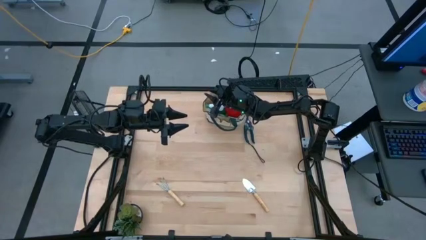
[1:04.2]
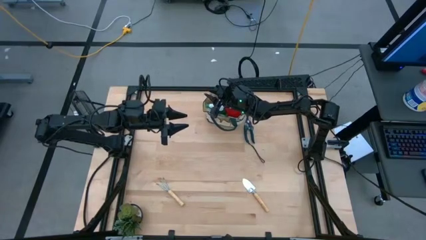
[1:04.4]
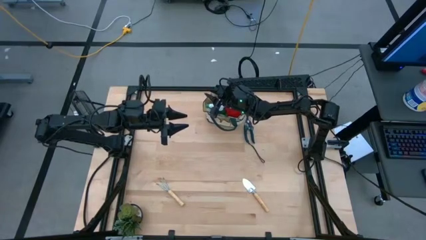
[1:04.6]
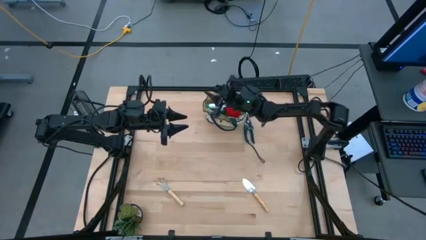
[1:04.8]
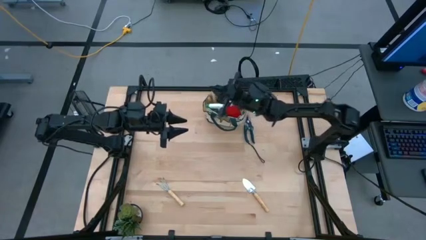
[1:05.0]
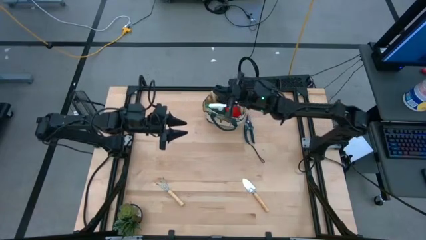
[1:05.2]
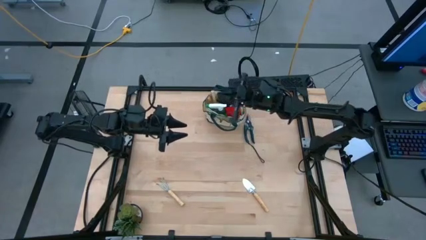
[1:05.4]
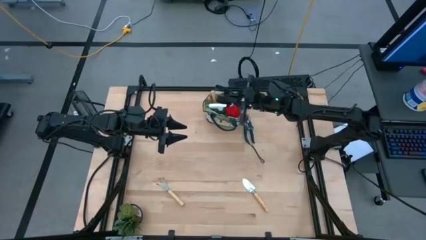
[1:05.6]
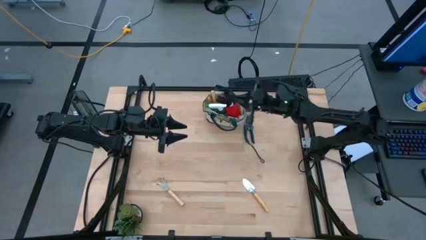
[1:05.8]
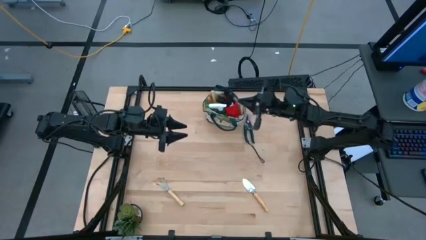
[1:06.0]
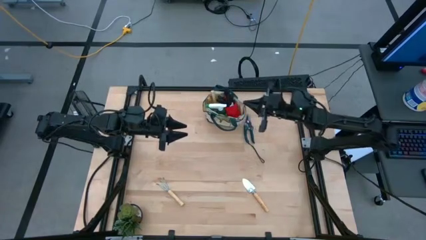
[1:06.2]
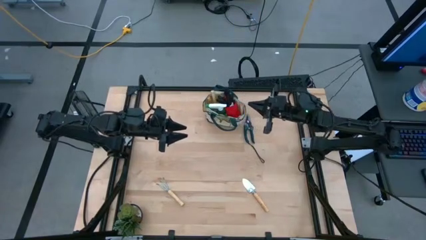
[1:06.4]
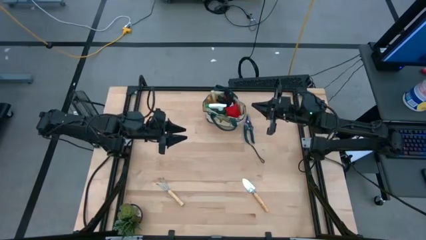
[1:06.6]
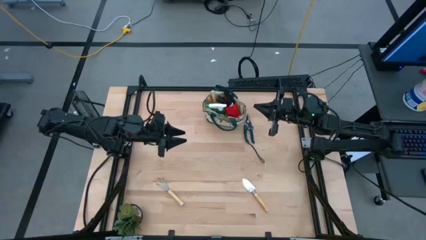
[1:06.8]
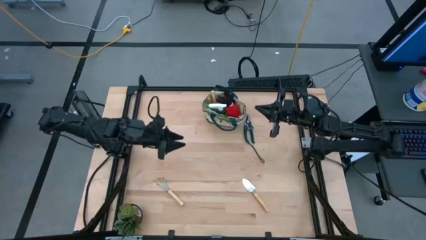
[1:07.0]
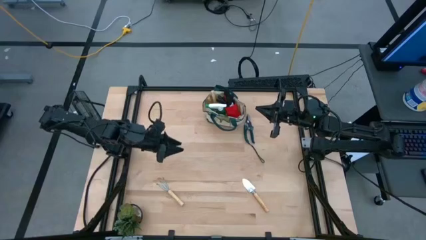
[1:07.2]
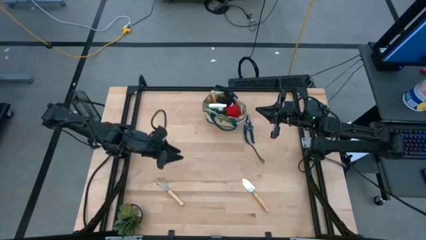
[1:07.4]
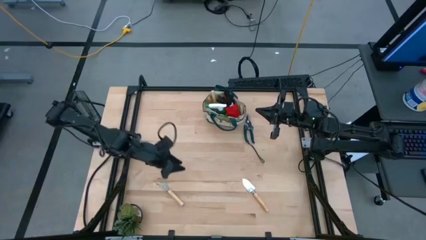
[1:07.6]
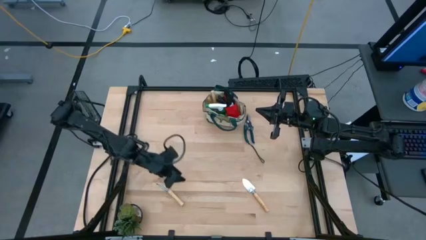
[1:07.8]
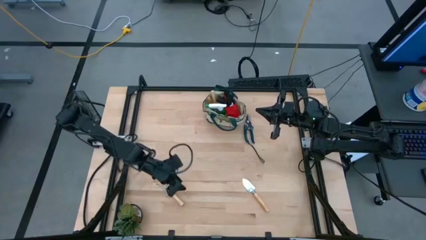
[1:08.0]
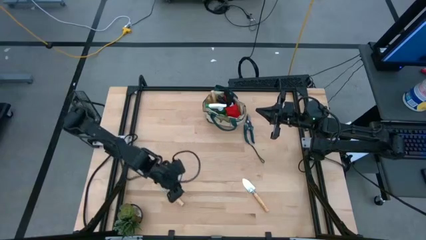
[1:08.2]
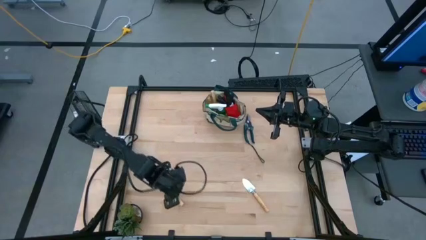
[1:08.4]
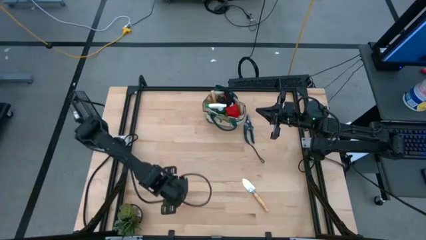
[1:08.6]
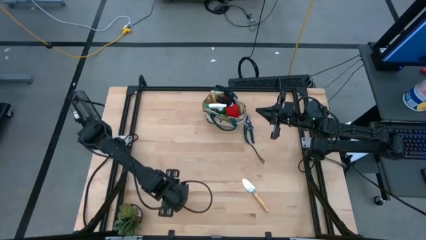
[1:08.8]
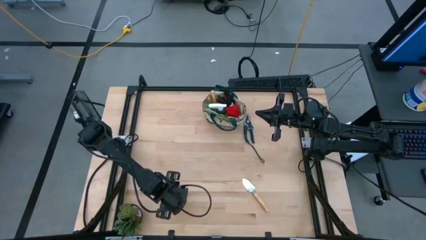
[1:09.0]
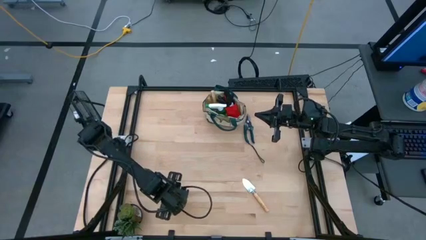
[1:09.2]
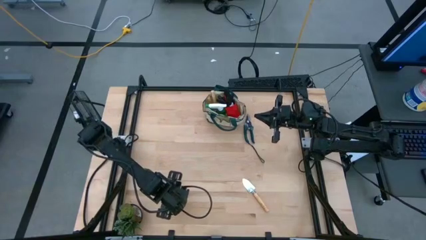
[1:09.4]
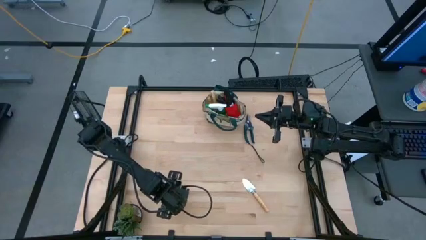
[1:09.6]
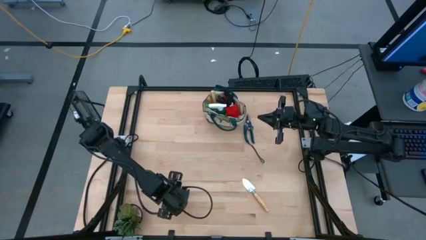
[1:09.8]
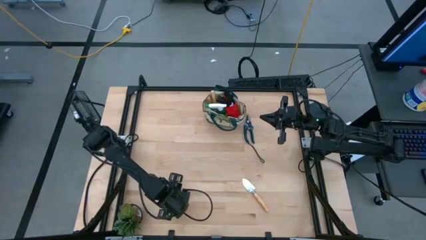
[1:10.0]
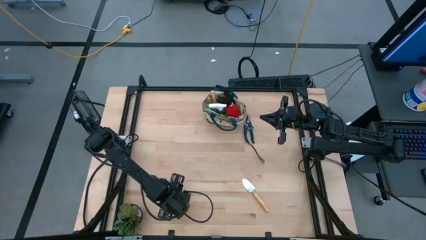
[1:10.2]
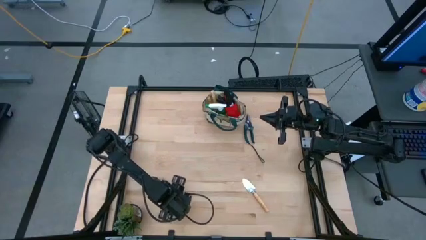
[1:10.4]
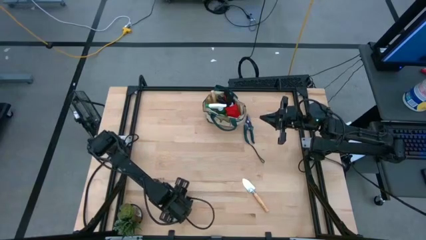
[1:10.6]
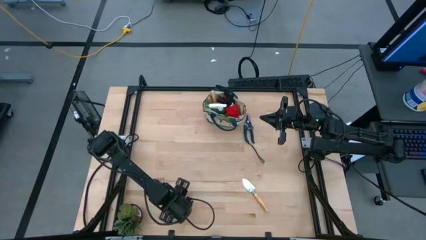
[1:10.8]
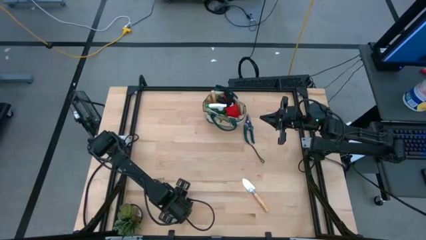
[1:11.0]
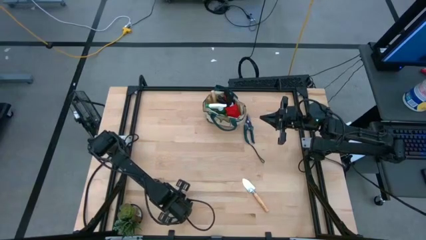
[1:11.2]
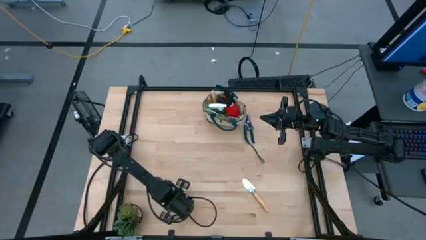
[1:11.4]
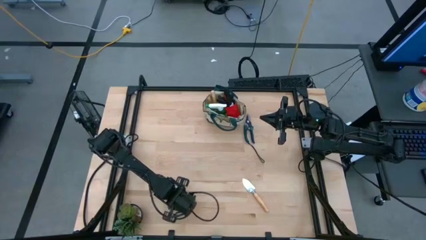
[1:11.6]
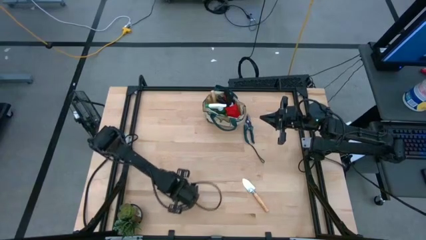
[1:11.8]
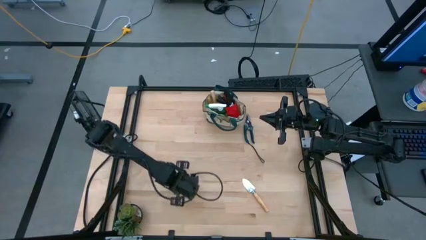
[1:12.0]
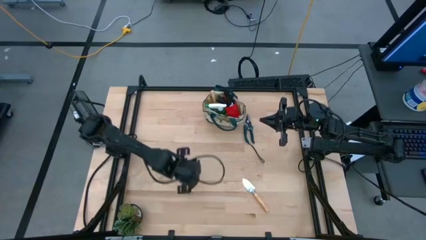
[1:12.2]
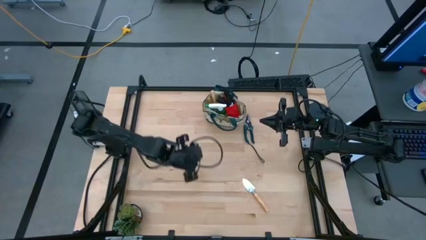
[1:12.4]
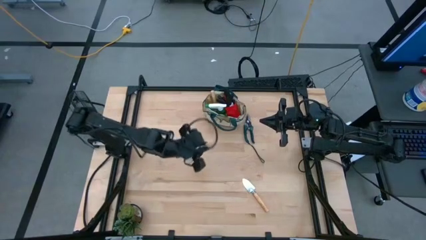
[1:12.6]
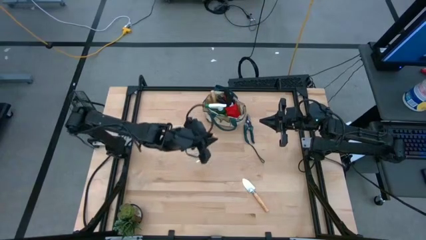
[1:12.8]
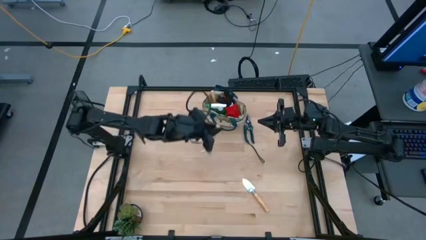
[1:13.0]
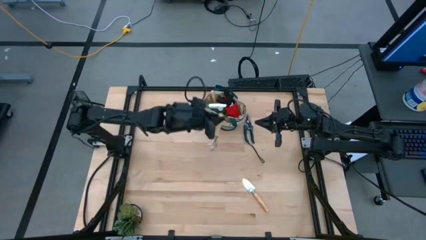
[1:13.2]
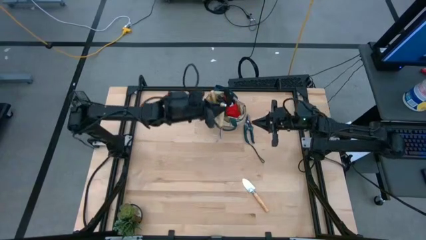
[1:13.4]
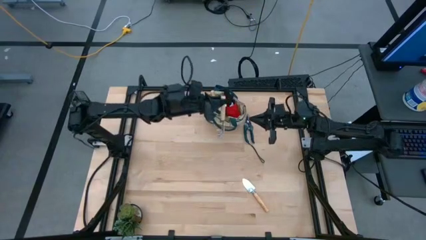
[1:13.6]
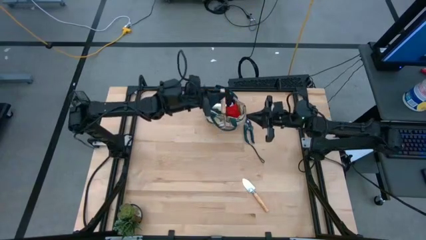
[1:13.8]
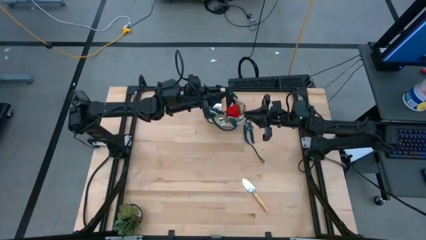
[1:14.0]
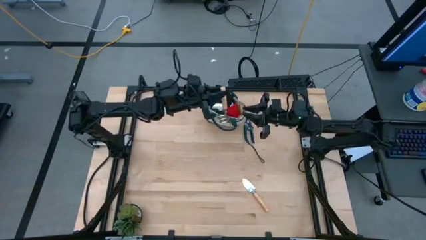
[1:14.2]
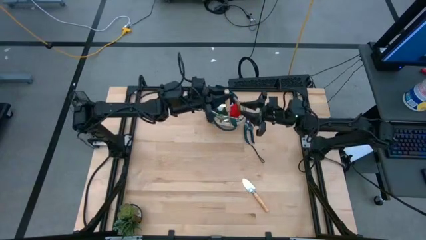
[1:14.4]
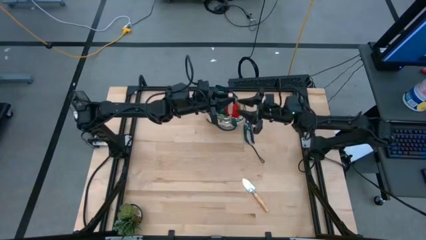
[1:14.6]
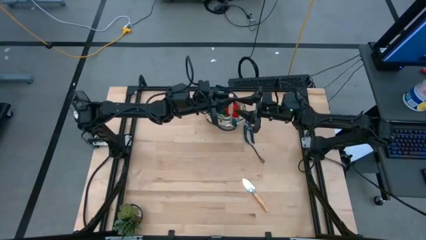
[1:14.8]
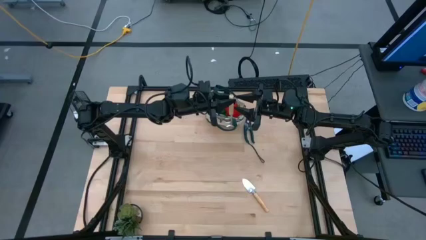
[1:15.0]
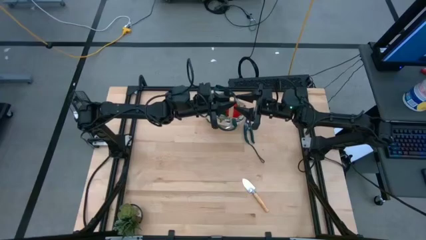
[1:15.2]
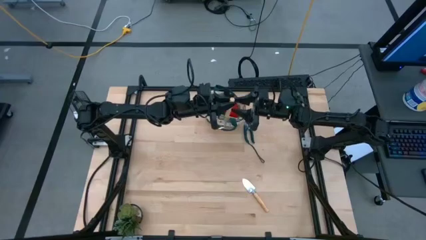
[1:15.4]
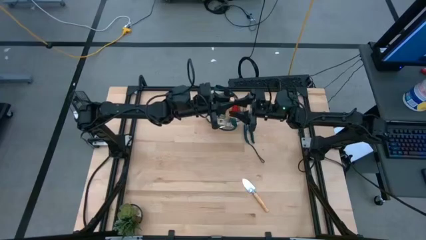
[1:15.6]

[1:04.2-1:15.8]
Task: Pick & Place Garden tools in Gardening bag
Put the brown hand rake into the green gardening bag

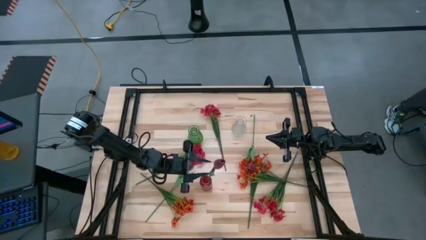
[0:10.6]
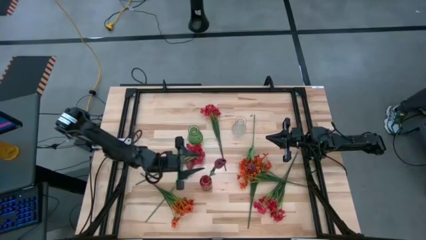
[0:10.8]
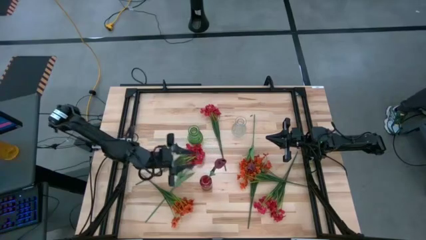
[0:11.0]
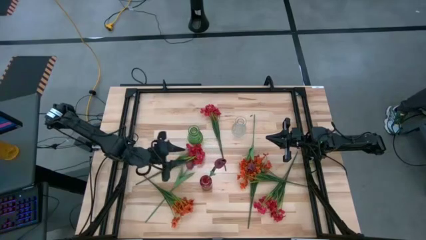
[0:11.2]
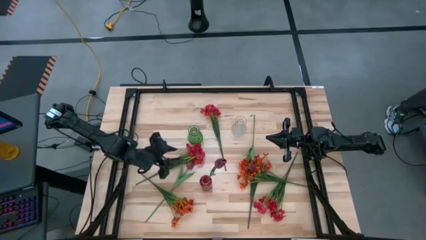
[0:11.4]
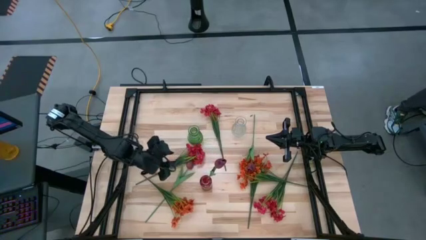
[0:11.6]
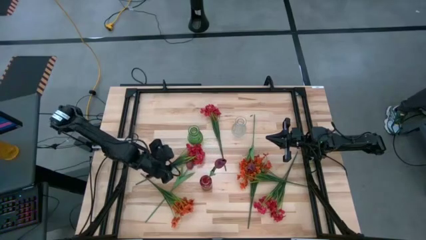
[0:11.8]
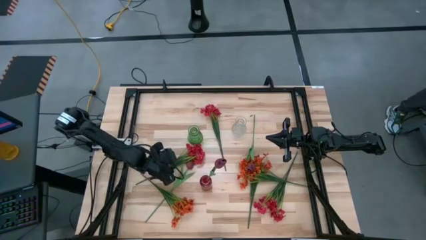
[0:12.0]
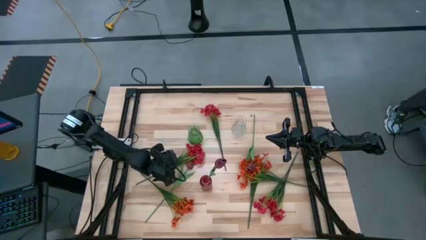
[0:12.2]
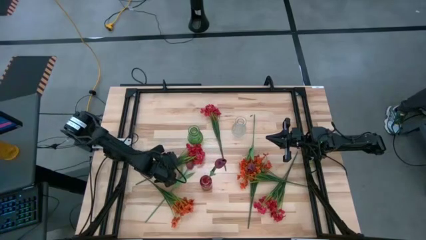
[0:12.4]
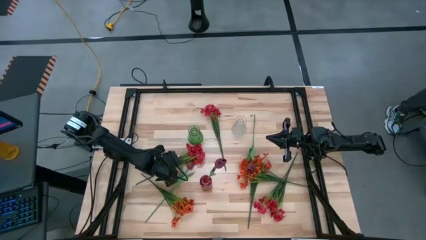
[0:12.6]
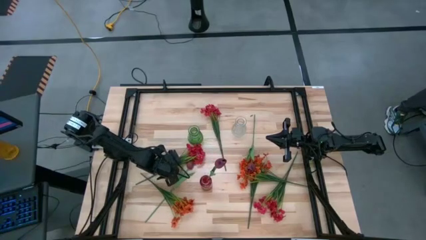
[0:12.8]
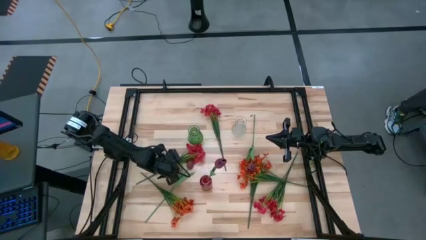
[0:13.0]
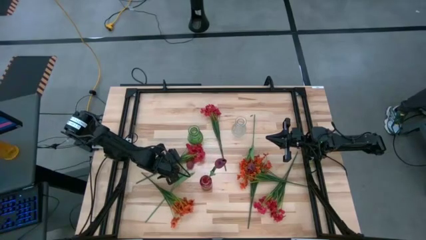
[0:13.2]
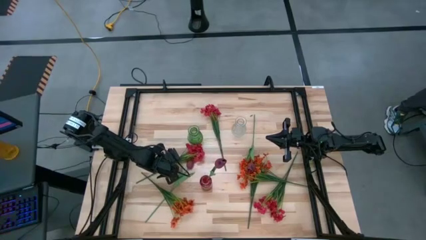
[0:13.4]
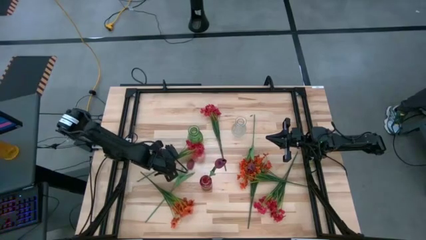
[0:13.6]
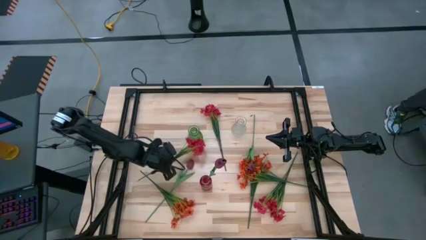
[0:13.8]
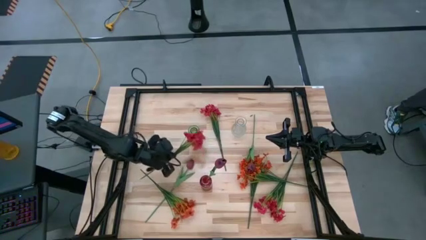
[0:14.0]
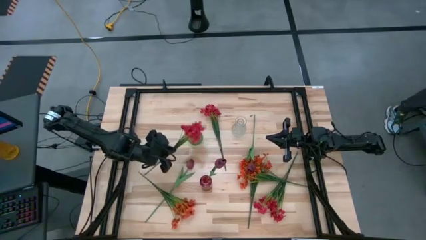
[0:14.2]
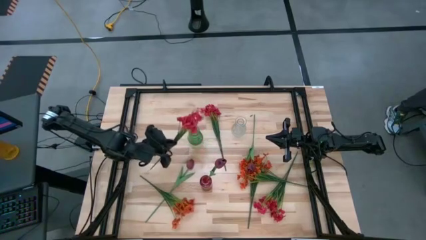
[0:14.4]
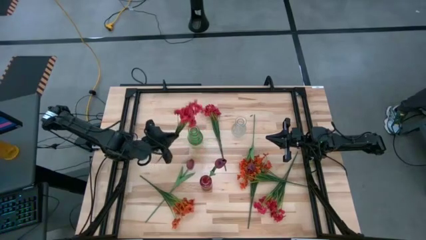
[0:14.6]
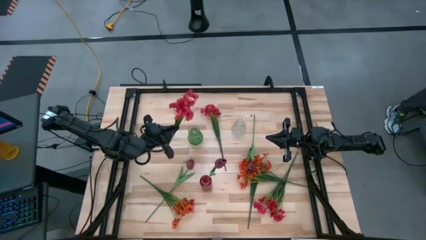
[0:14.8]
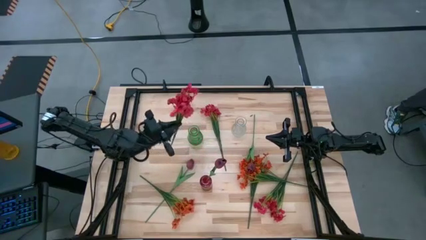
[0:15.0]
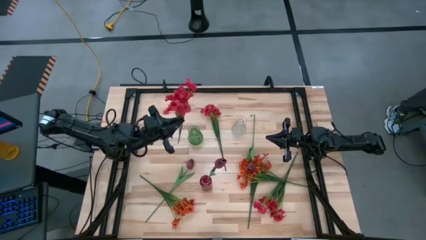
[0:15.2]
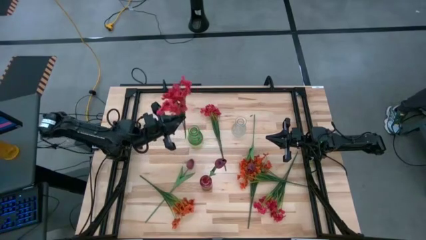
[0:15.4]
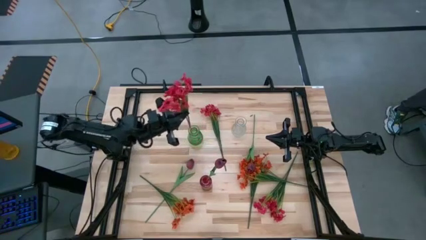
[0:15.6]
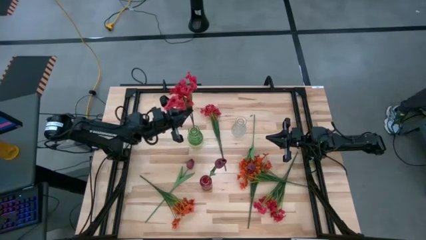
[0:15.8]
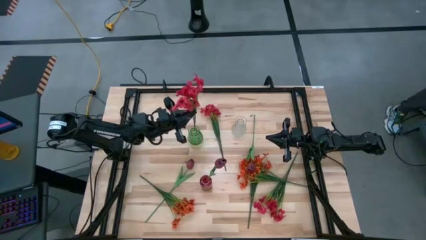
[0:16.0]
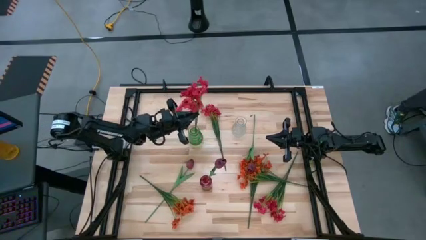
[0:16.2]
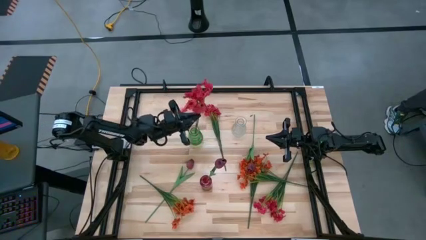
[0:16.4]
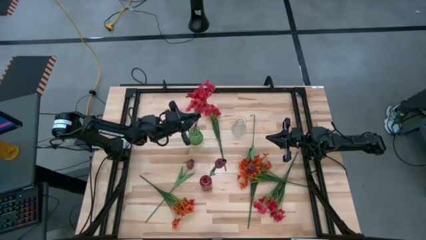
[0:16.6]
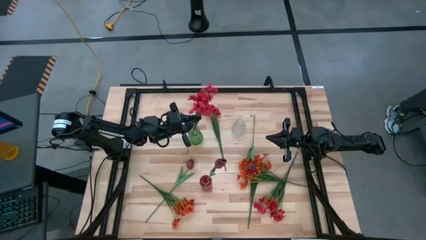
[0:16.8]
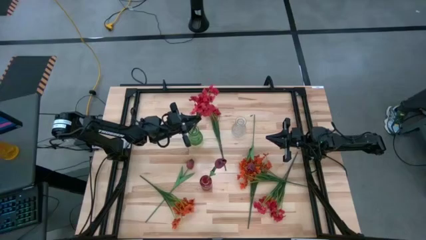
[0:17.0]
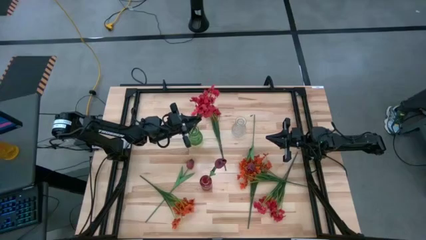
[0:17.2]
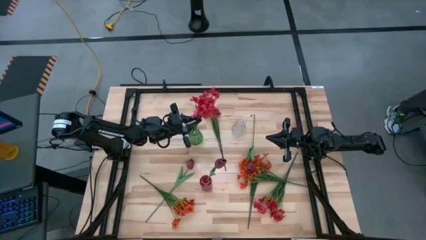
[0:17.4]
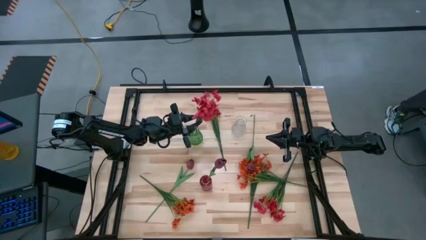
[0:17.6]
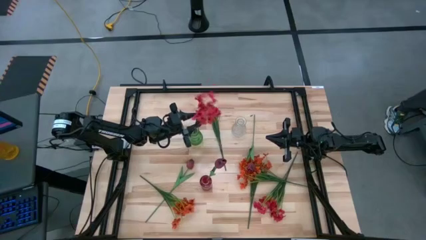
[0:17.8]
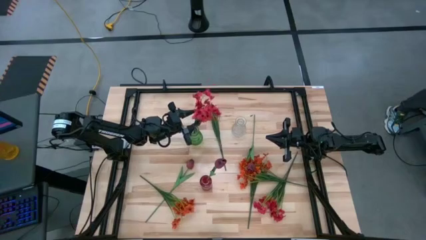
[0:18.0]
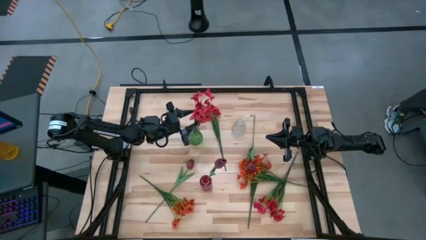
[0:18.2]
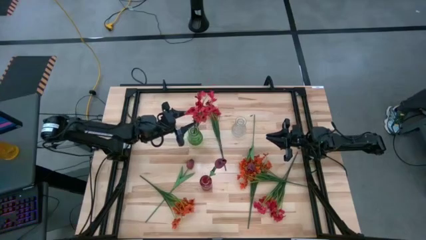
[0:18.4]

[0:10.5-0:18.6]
Task: Sort flowers into vase by color
Put the left pink flowers into the green vase
